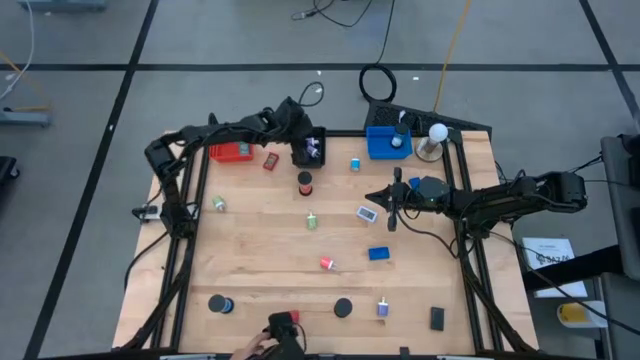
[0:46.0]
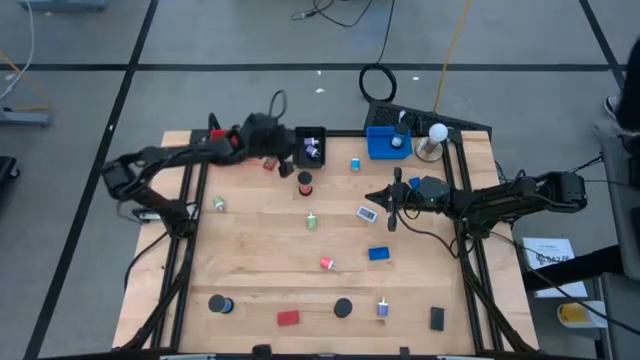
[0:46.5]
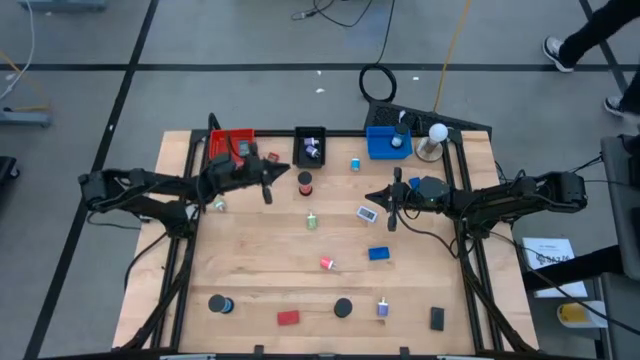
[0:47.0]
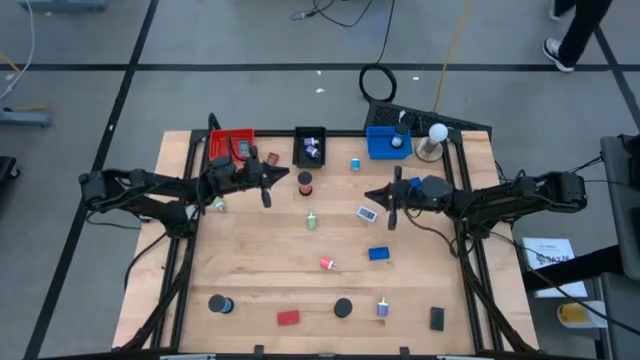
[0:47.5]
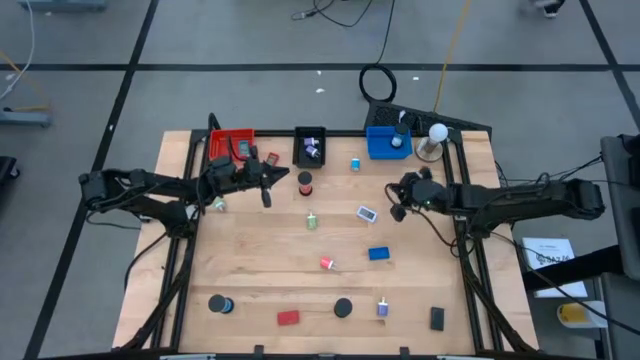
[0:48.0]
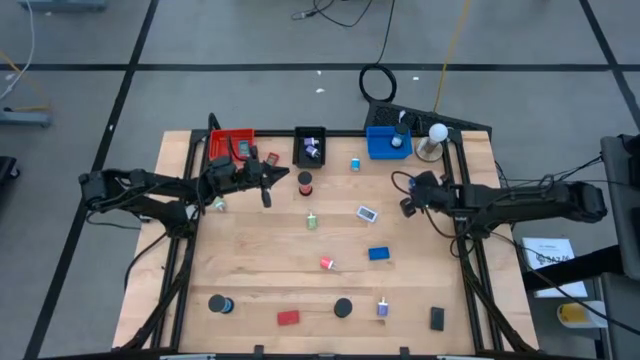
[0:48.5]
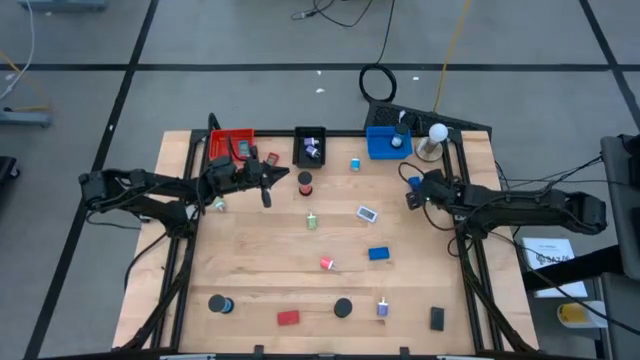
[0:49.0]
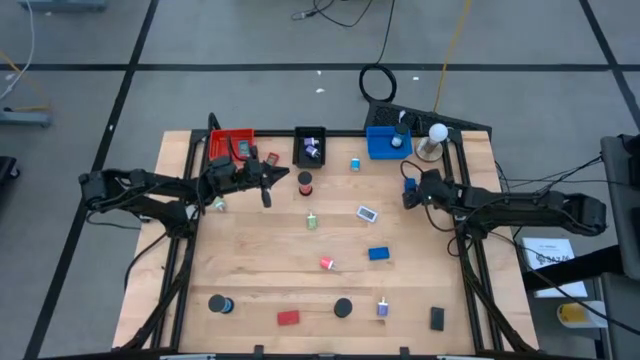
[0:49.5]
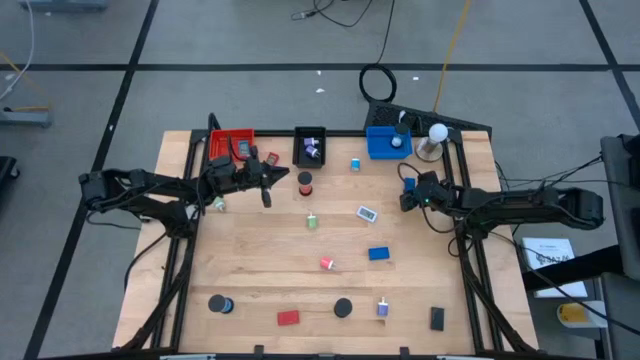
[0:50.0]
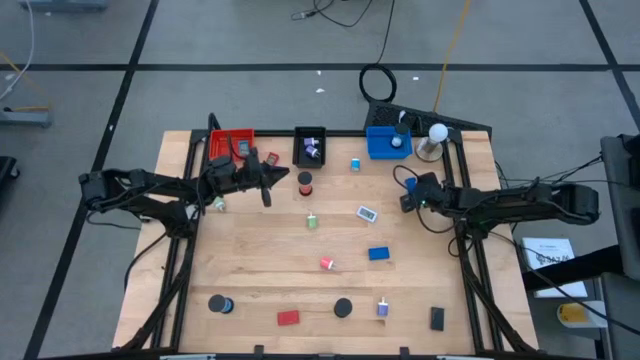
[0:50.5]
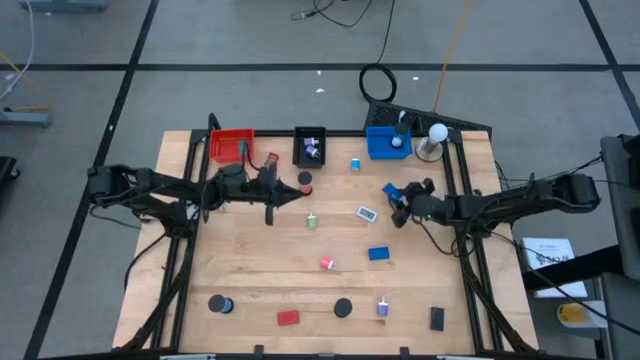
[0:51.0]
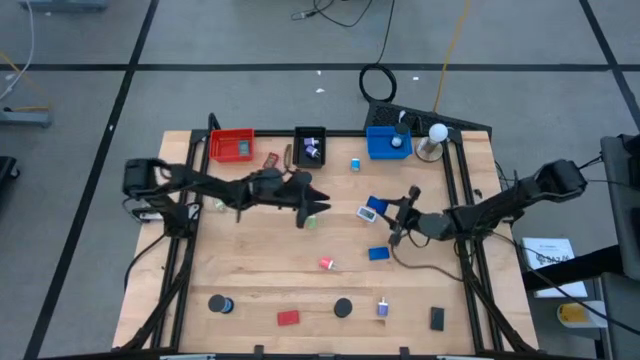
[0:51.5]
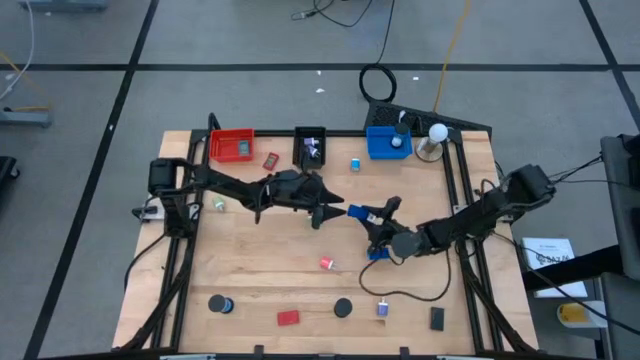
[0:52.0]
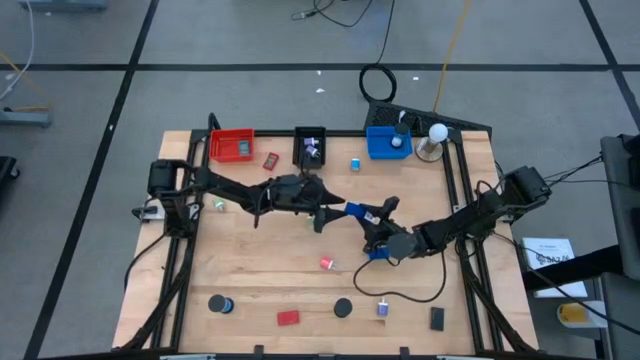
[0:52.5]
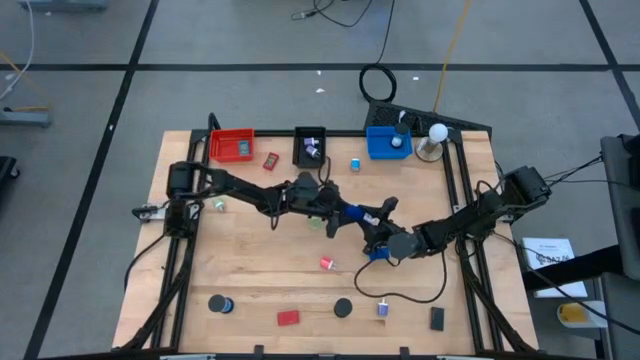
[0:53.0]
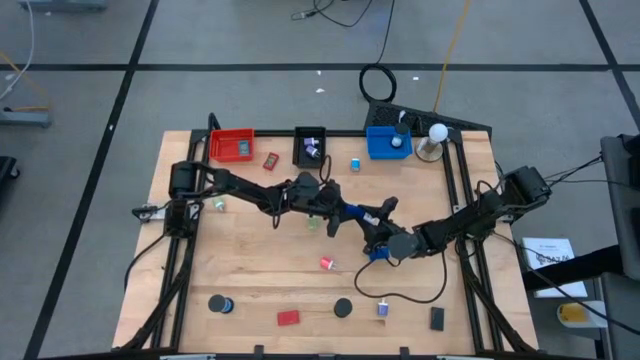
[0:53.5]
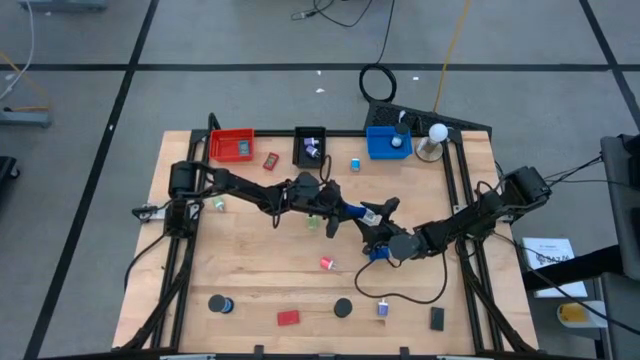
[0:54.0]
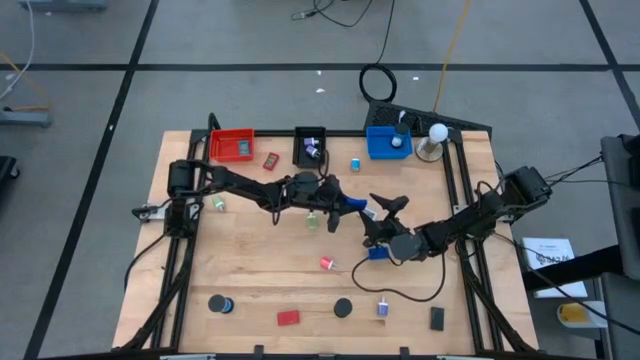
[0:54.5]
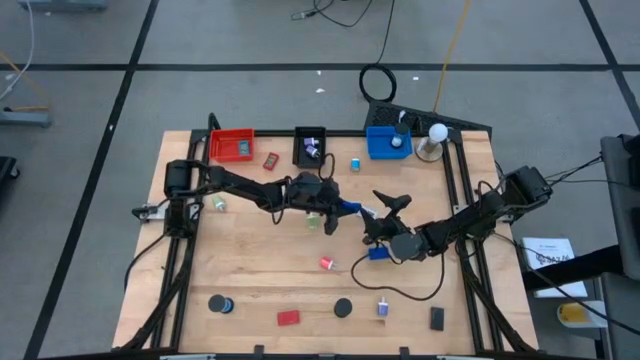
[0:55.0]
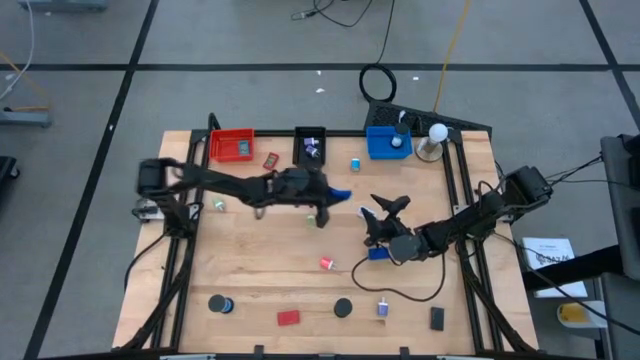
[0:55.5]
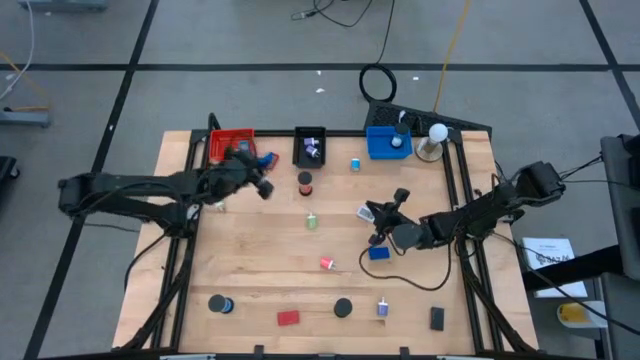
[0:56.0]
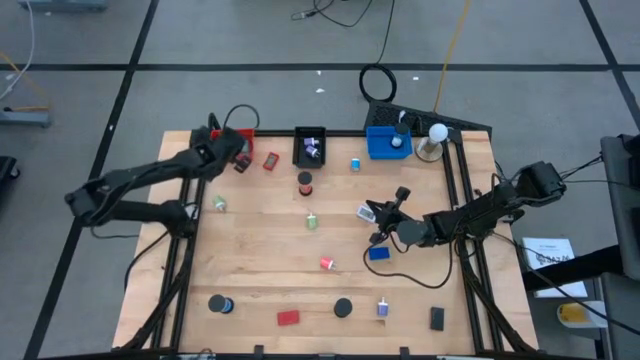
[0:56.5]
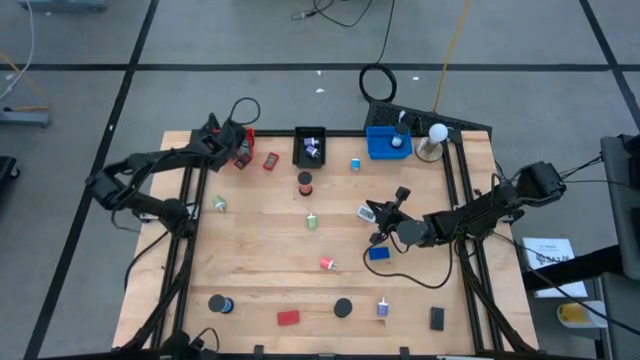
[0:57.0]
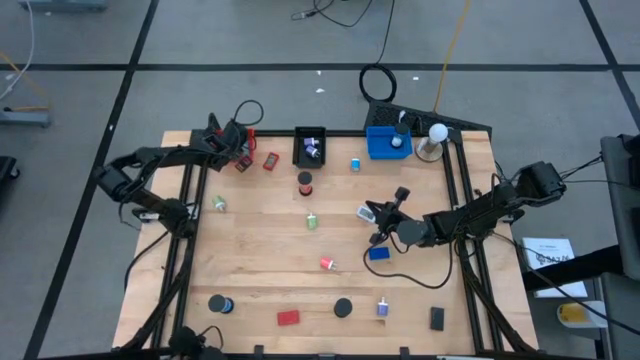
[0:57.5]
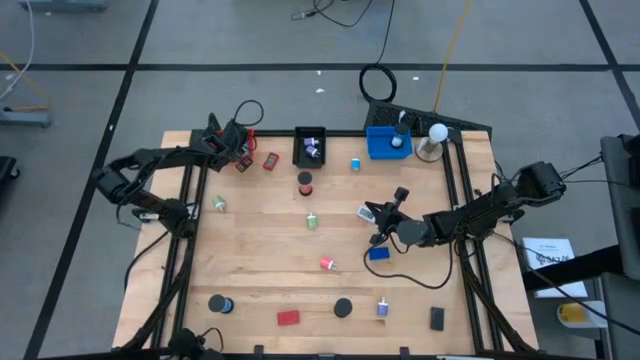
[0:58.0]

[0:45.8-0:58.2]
Task: Pick & Place Office items
Put the top blue digital clock into the red bin

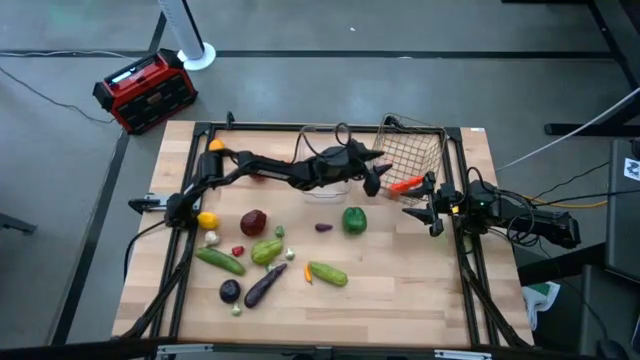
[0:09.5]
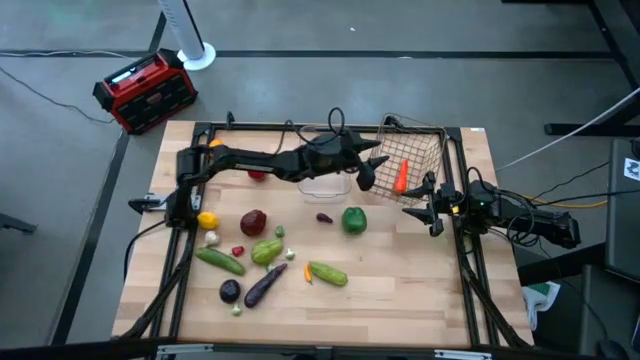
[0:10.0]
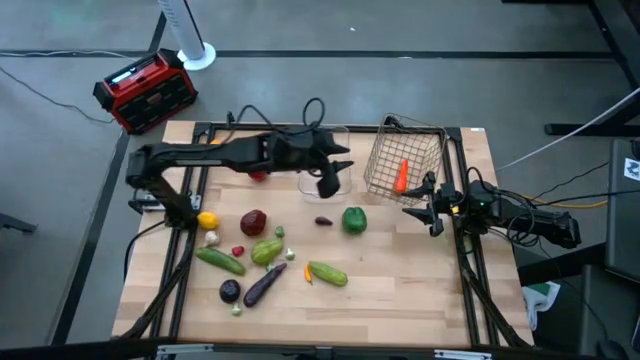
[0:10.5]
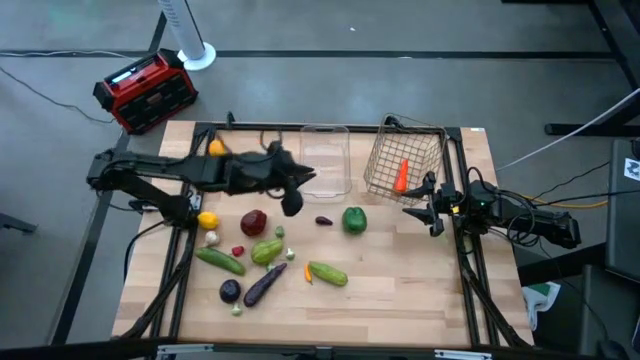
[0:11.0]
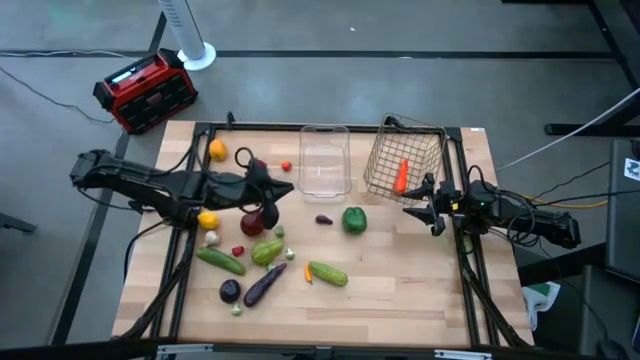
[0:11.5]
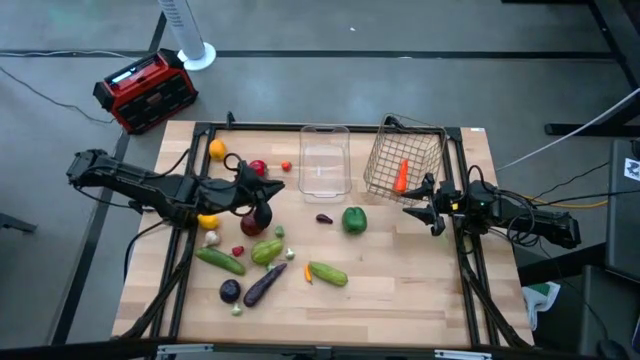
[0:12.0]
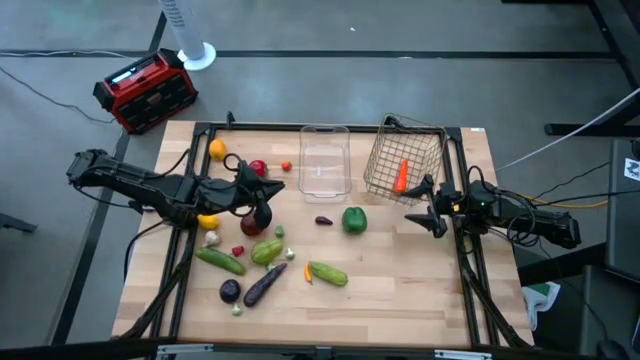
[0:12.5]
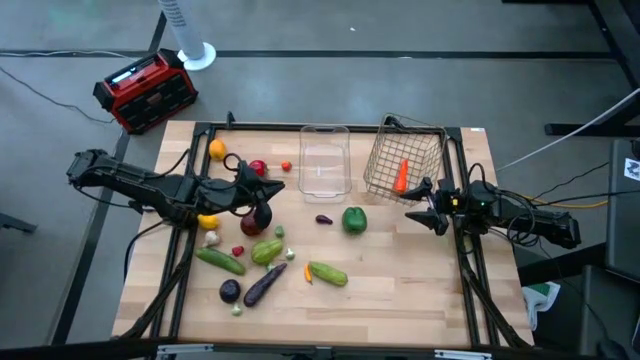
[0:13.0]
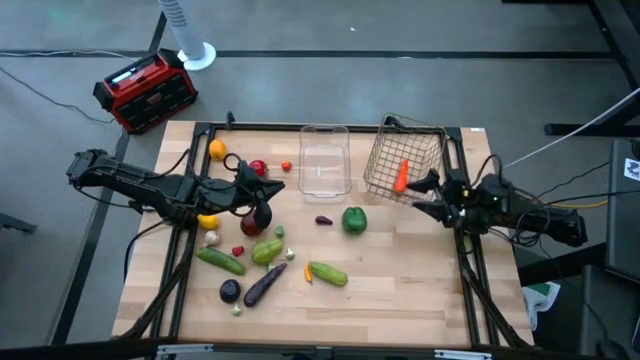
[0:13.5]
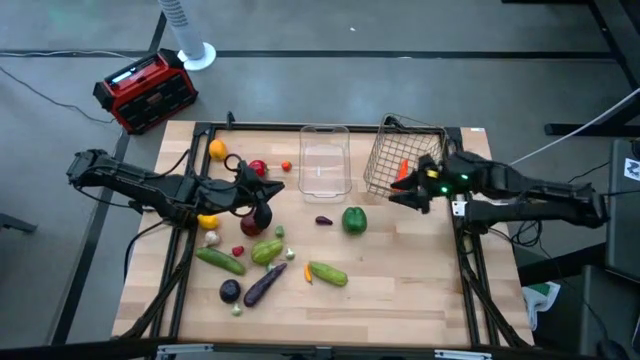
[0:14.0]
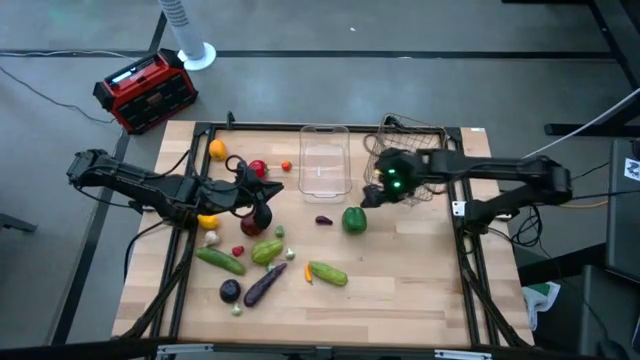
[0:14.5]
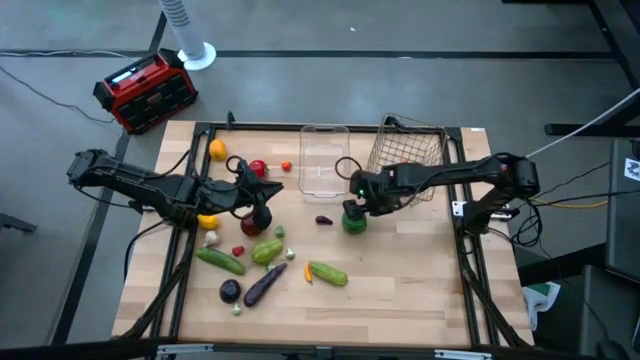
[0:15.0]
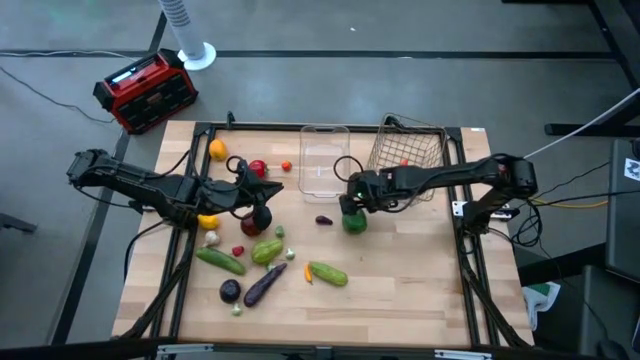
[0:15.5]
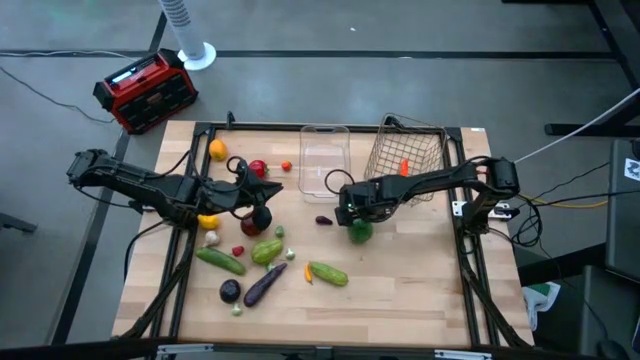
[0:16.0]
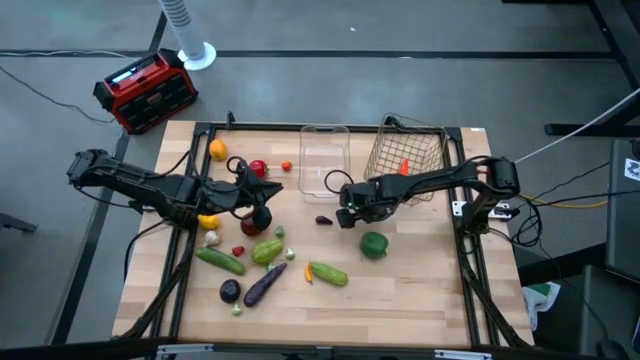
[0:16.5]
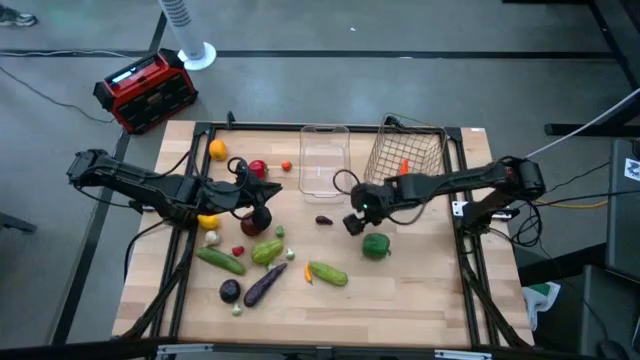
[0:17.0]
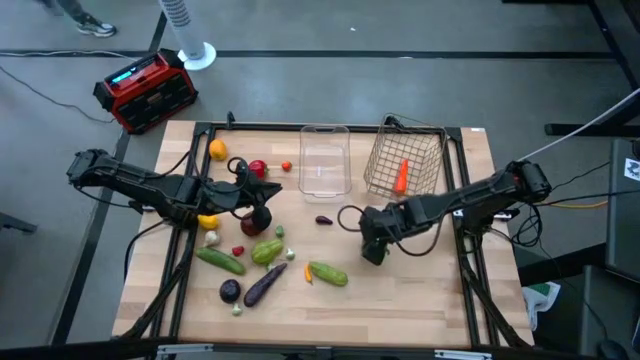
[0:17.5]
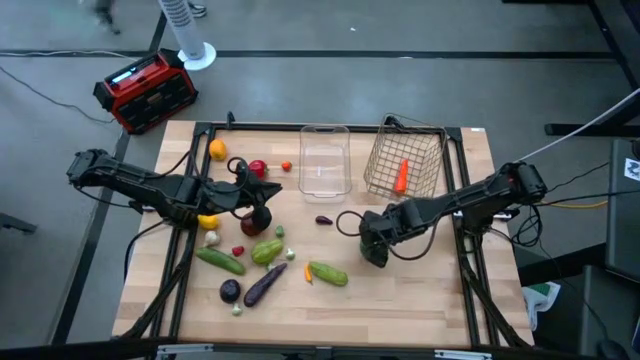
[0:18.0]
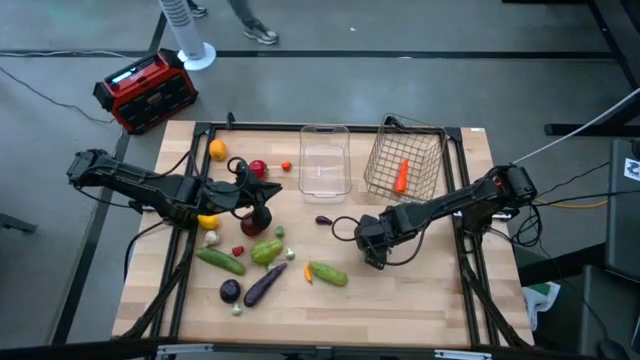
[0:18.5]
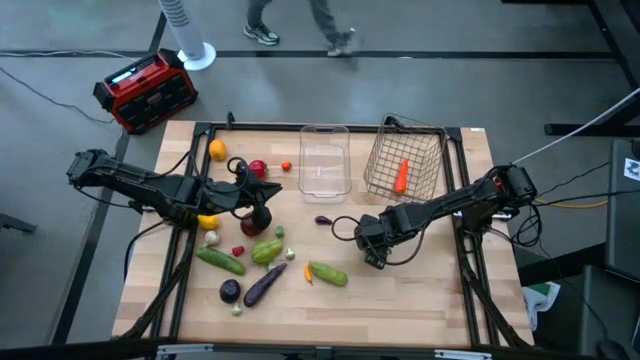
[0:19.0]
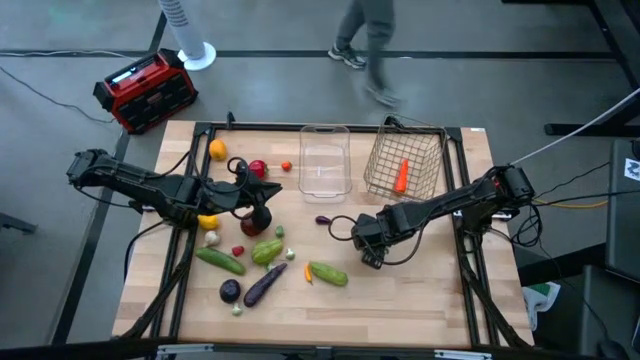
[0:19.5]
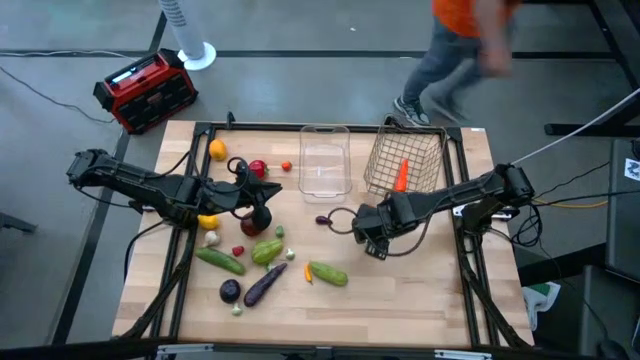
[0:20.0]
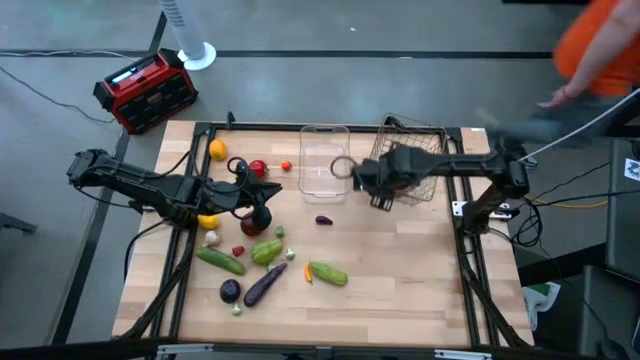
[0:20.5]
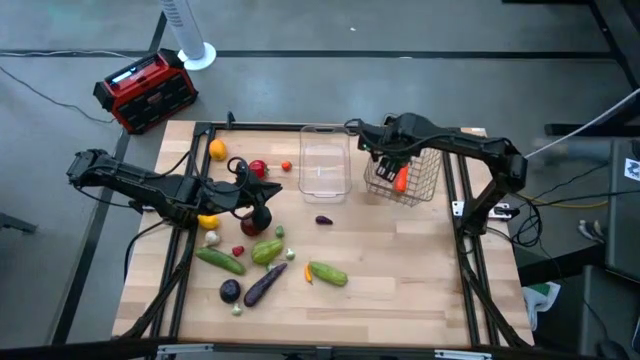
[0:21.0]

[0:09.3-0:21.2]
Task: Sort produce into baskets
Put the green bell pepper into the wire basket
